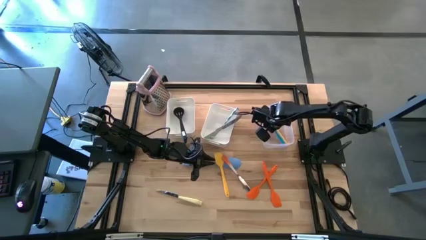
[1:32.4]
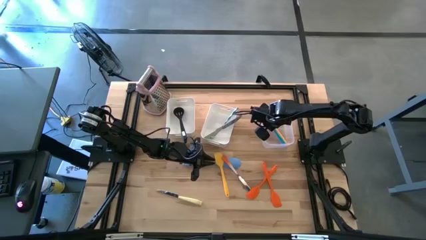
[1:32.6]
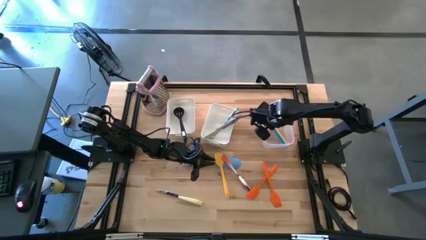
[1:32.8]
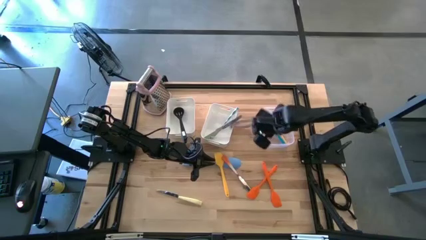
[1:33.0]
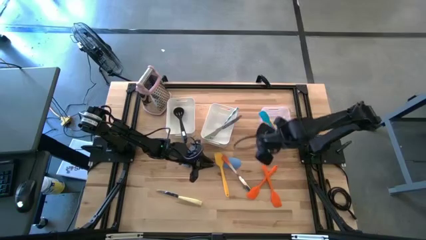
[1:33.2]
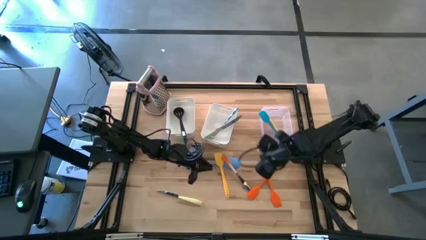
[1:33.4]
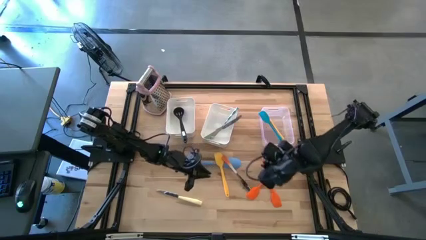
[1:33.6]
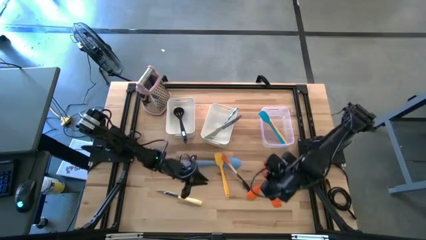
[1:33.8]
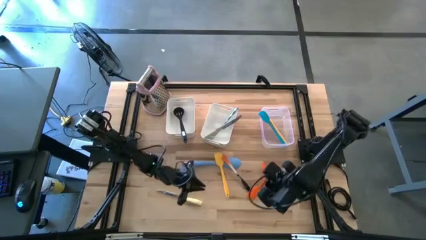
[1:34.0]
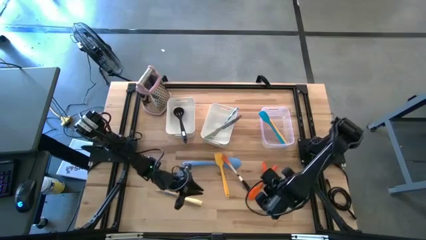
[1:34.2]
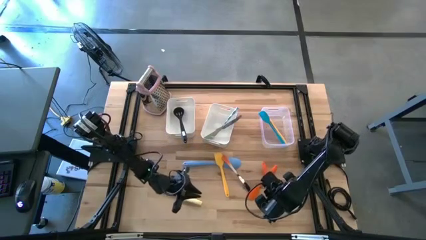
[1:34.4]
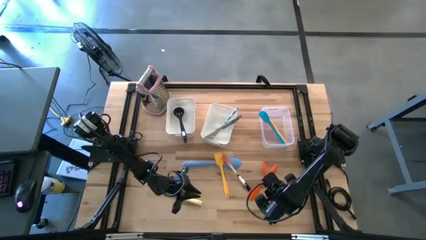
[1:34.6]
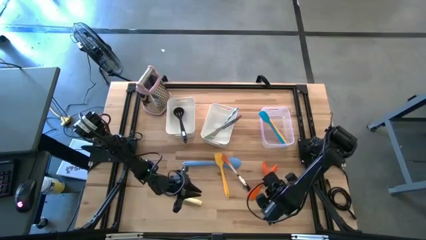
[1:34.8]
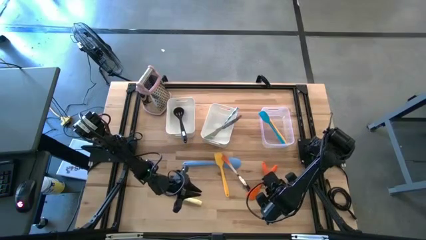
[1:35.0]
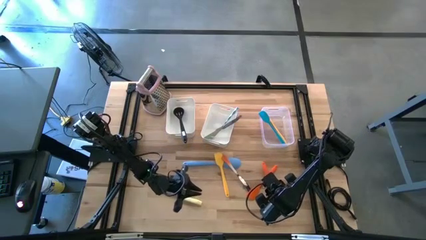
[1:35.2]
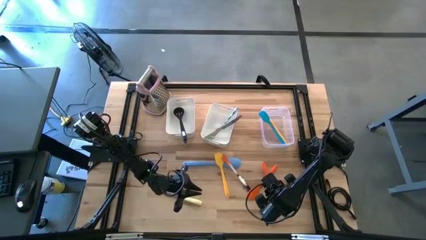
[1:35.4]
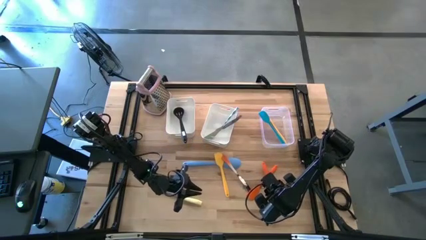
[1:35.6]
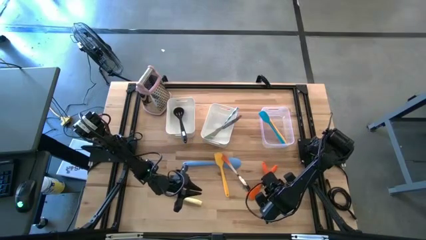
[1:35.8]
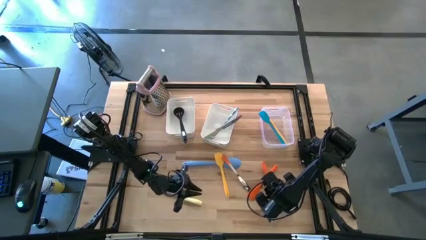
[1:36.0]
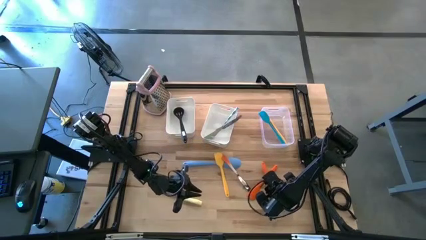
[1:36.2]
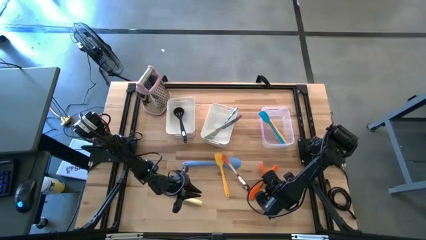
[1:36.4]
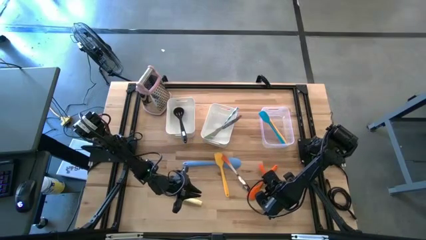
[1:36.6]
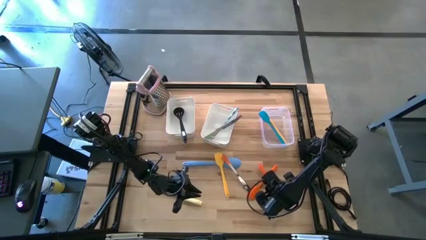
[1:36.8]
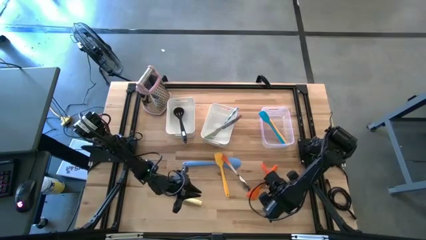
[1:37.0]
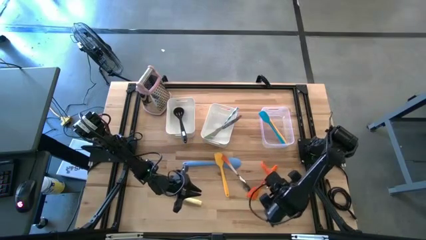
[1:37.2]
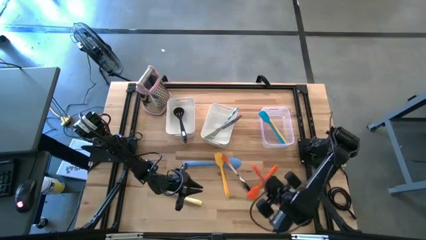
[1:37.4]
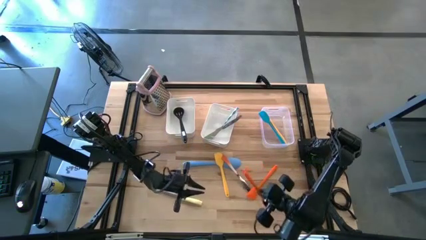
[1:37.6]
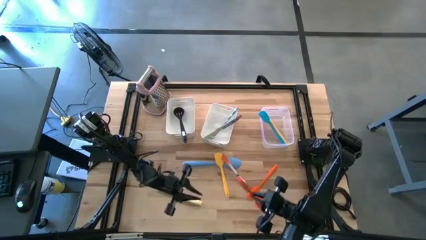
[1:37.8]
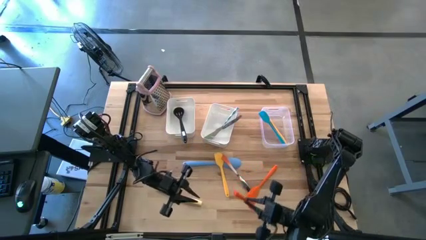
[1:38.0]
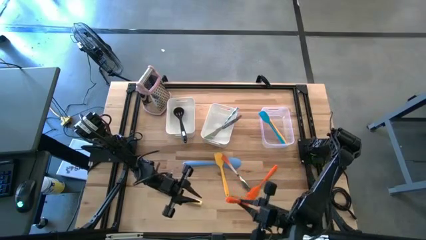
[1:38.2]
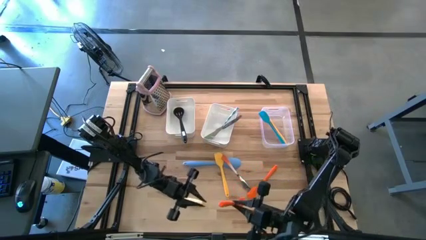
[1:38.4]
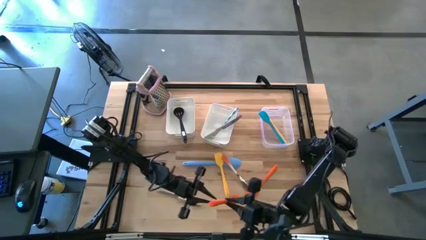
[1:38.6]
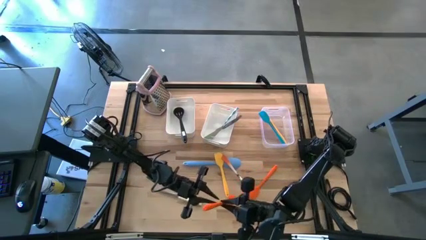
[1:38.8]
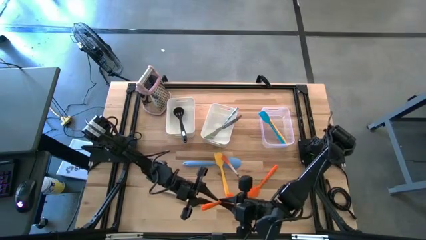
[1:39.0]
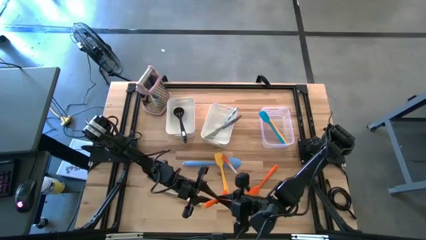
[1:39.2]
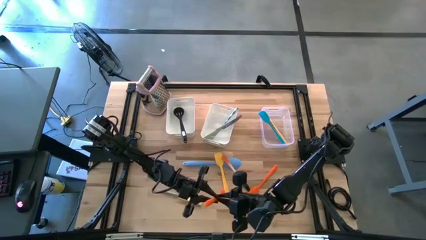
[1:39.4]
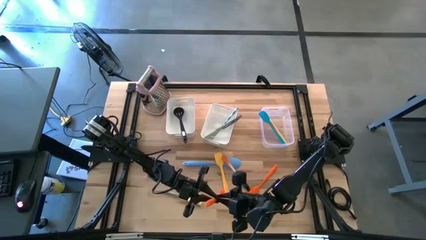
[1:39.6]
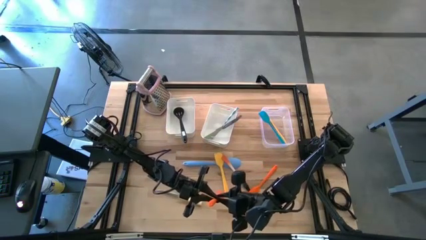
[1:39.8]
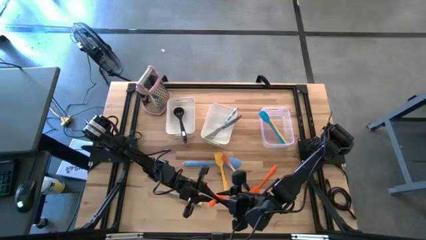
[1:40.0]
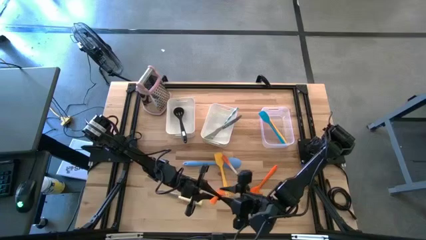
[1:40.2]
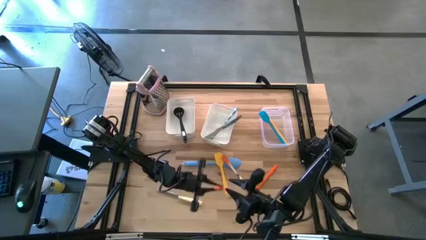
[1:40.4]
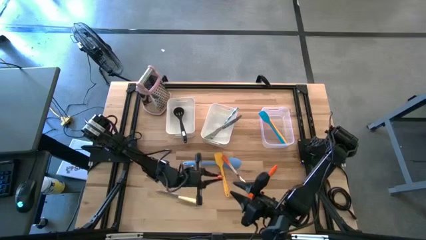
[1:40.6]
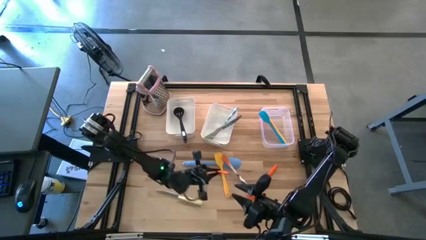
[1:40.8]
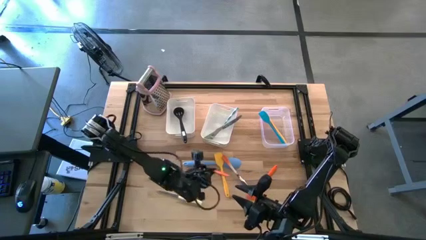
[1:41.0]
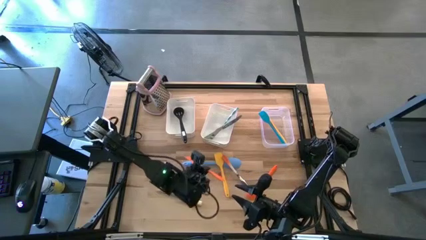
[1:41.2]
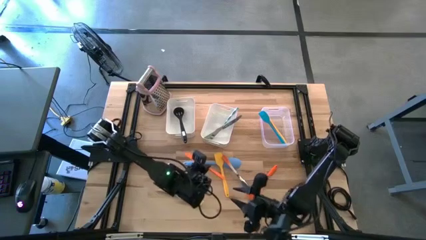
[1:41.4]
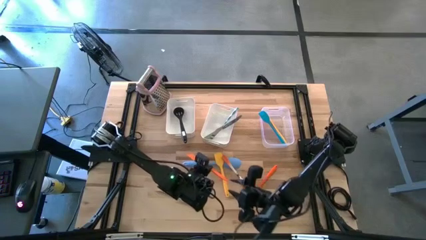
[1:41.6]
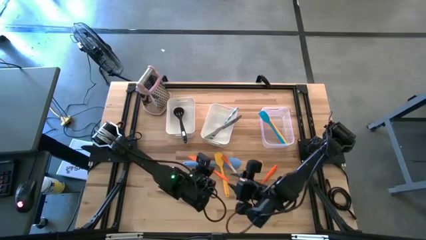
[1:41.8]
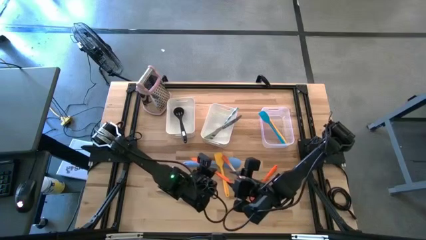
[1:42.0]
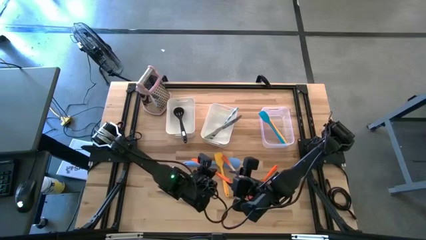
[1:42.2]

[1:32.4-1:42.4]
Task: Pick & Place Kitchen Items
Put the right orange spatula into the transparent bin
